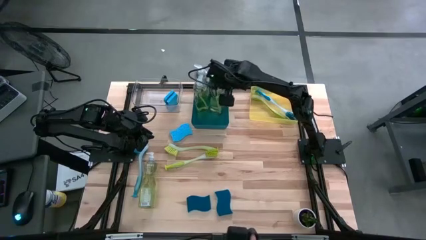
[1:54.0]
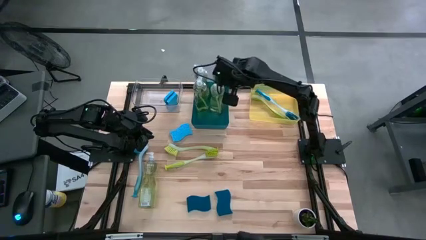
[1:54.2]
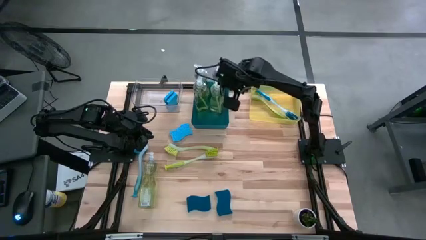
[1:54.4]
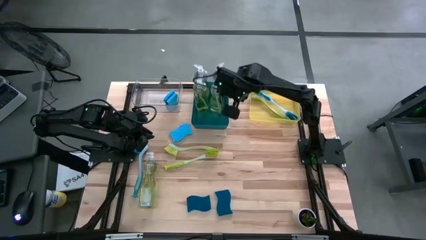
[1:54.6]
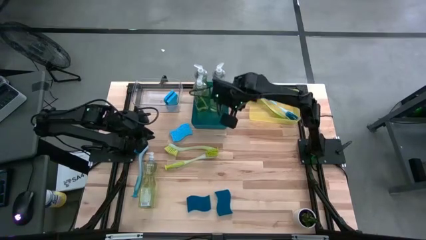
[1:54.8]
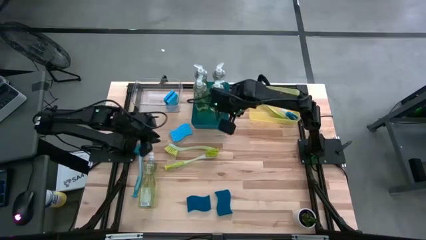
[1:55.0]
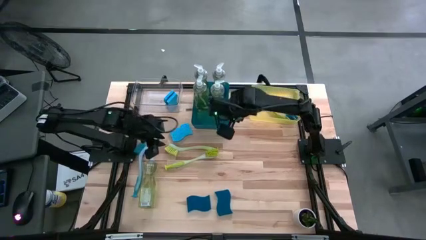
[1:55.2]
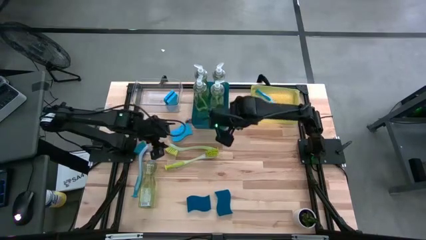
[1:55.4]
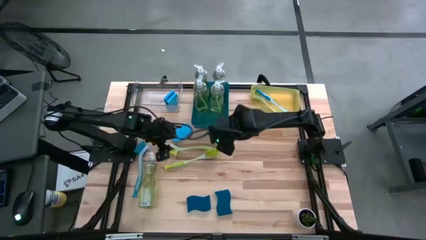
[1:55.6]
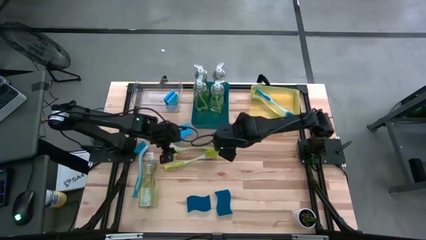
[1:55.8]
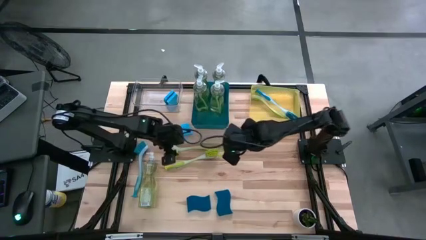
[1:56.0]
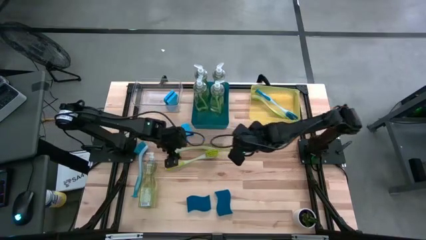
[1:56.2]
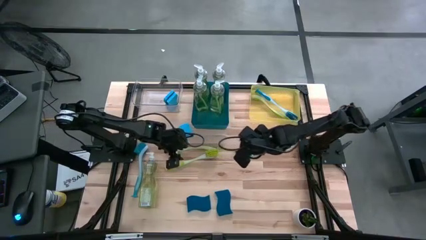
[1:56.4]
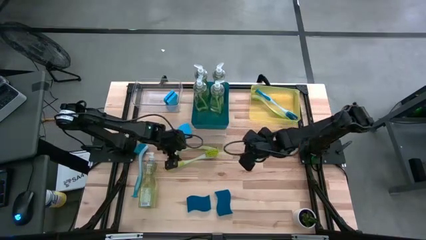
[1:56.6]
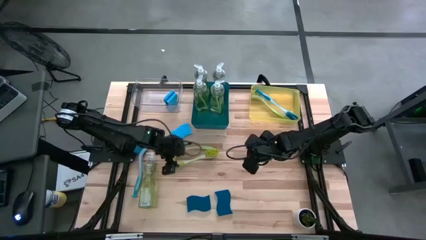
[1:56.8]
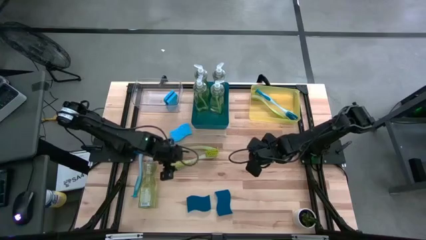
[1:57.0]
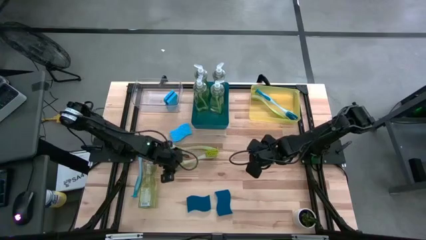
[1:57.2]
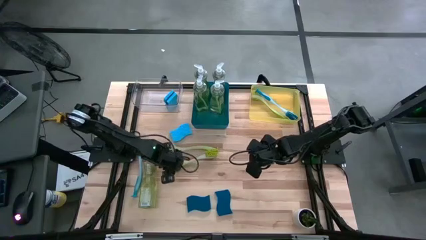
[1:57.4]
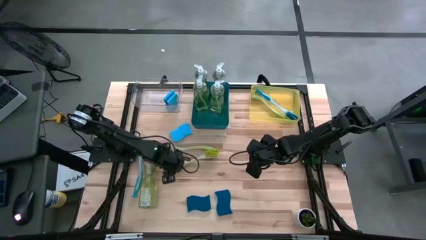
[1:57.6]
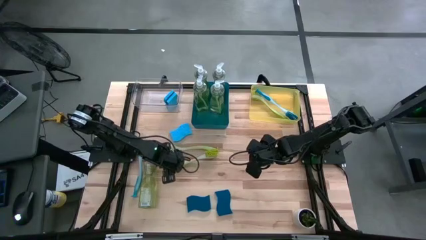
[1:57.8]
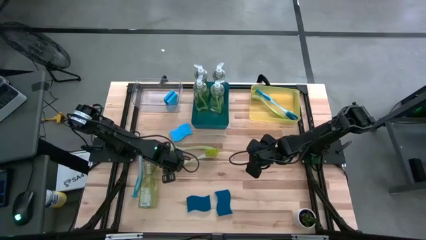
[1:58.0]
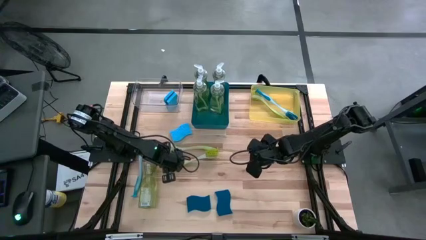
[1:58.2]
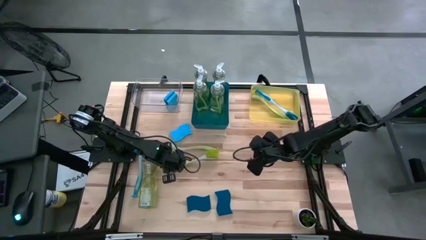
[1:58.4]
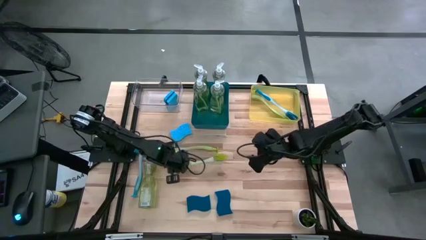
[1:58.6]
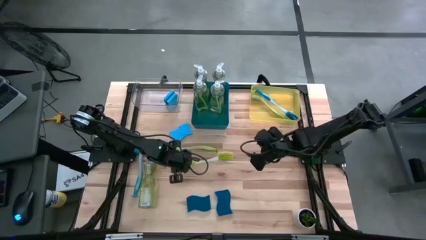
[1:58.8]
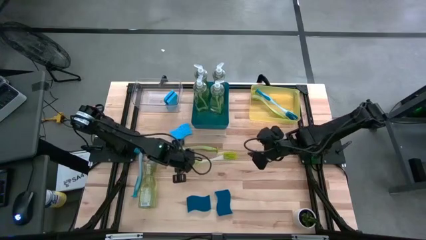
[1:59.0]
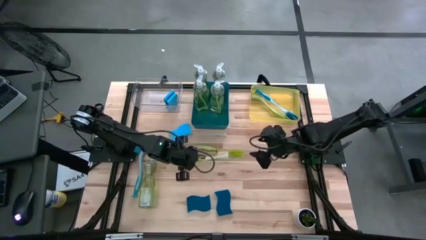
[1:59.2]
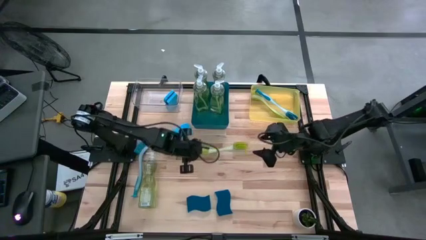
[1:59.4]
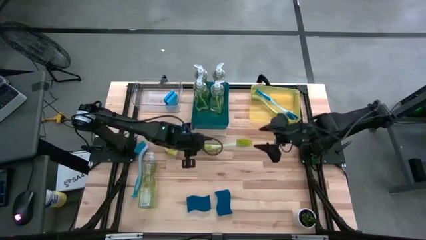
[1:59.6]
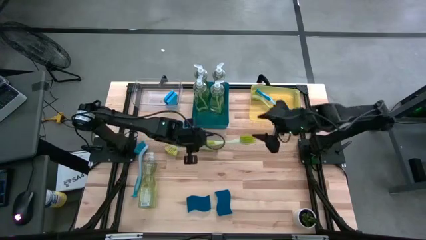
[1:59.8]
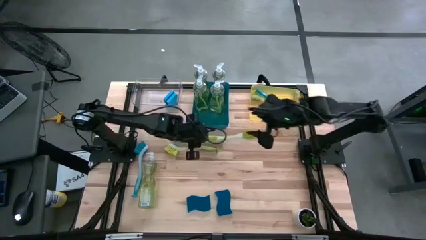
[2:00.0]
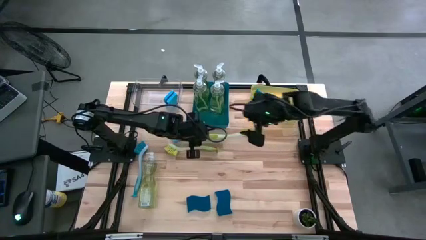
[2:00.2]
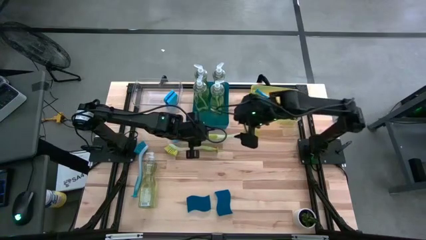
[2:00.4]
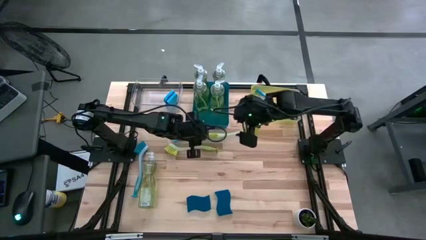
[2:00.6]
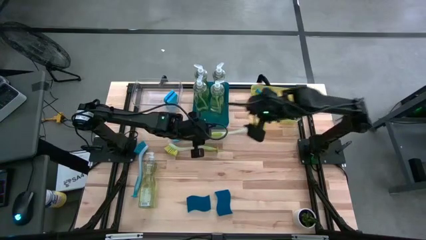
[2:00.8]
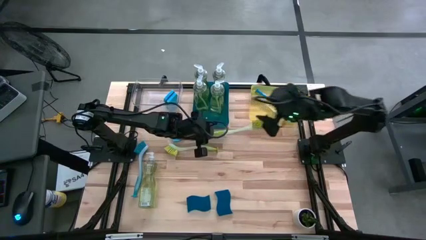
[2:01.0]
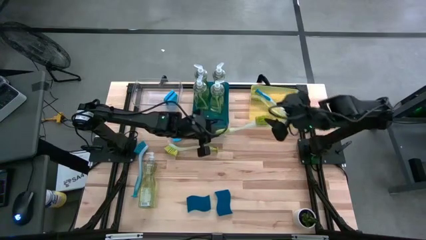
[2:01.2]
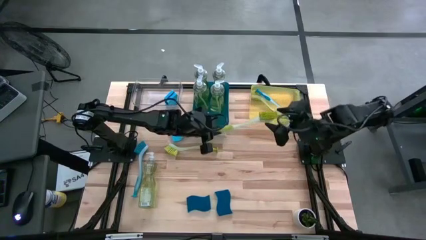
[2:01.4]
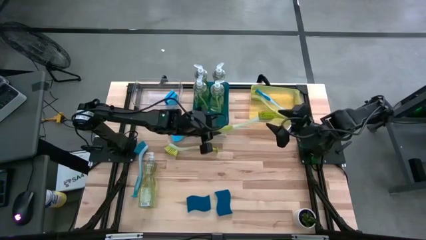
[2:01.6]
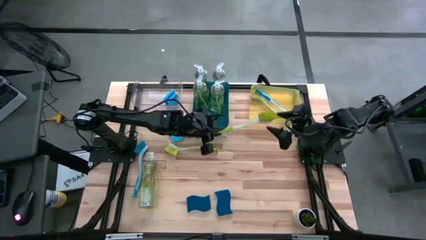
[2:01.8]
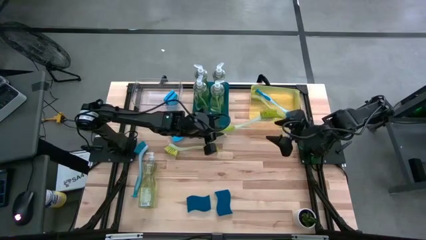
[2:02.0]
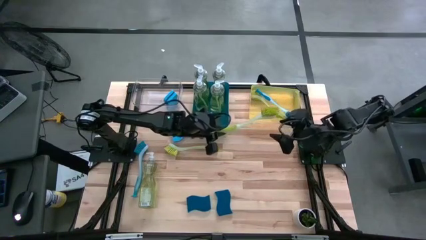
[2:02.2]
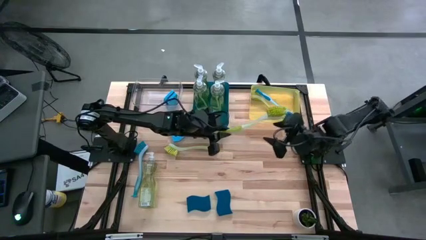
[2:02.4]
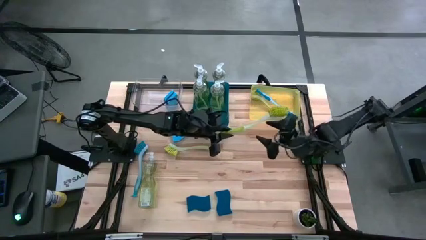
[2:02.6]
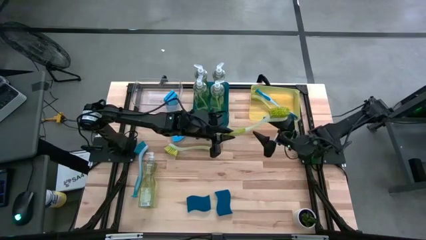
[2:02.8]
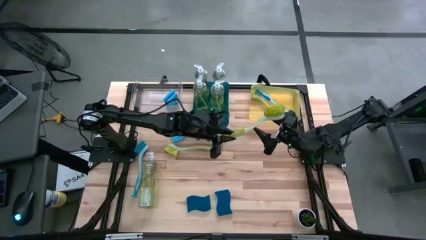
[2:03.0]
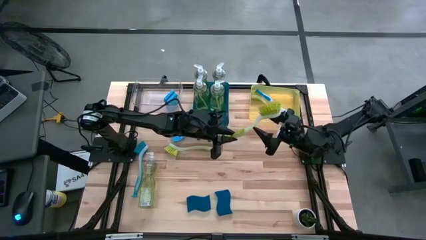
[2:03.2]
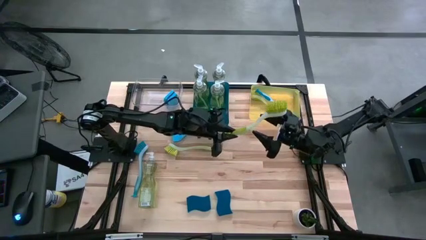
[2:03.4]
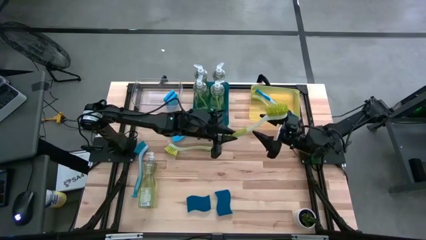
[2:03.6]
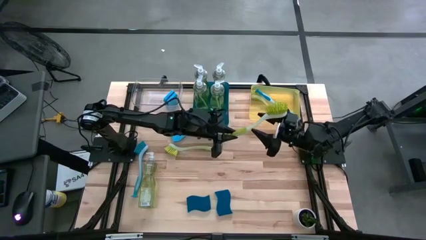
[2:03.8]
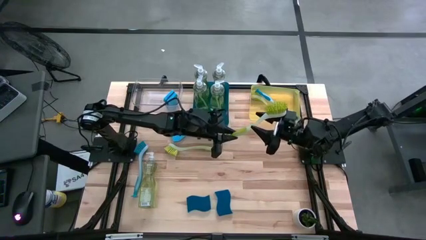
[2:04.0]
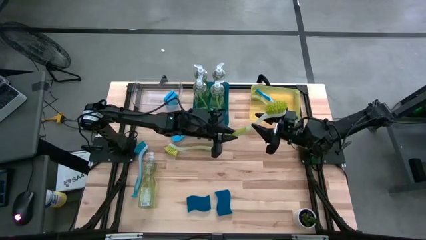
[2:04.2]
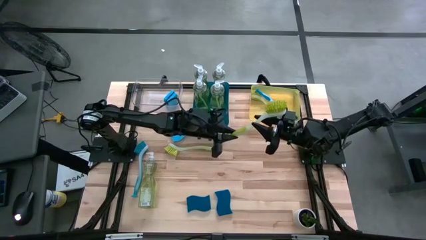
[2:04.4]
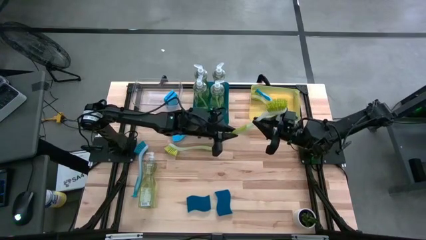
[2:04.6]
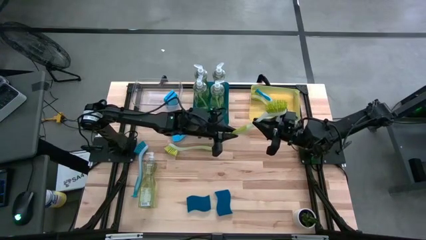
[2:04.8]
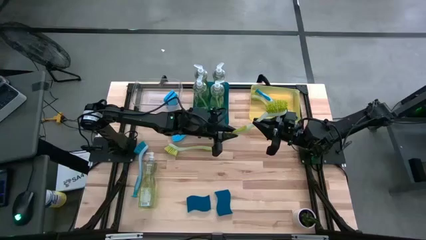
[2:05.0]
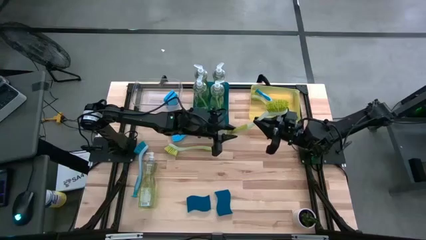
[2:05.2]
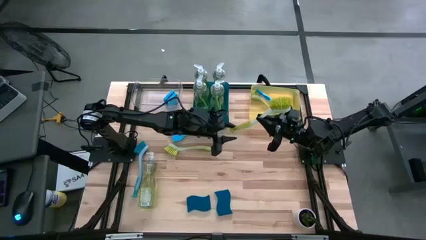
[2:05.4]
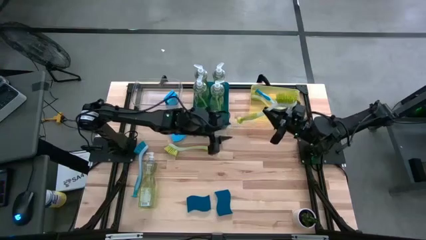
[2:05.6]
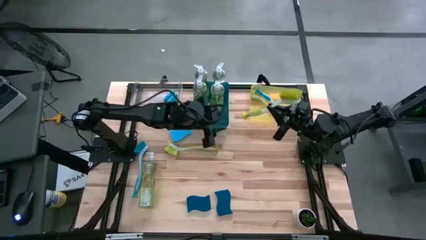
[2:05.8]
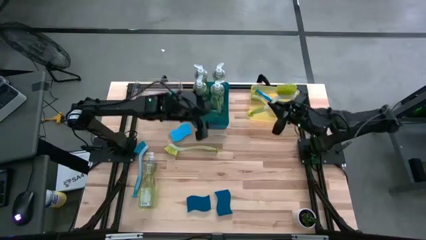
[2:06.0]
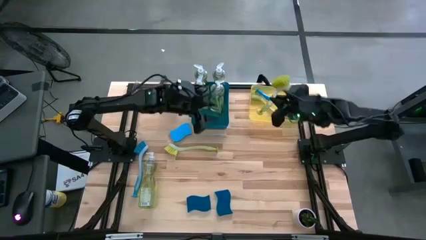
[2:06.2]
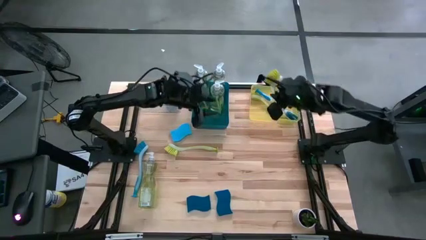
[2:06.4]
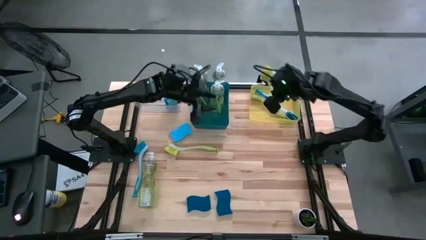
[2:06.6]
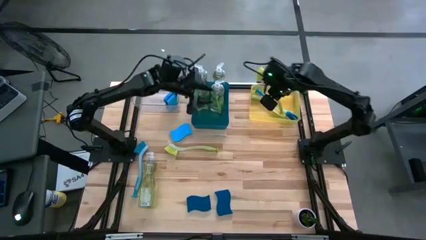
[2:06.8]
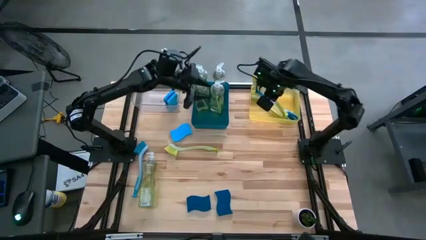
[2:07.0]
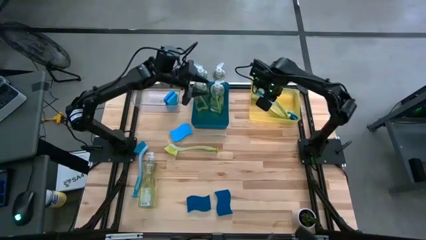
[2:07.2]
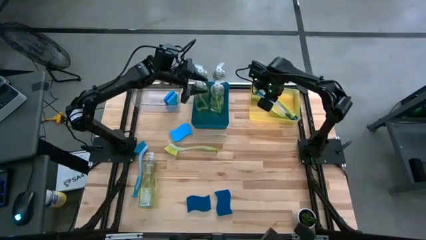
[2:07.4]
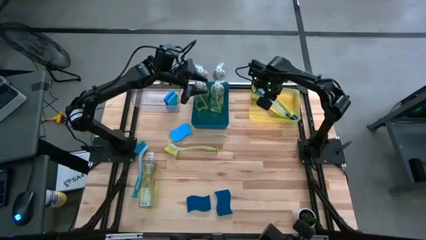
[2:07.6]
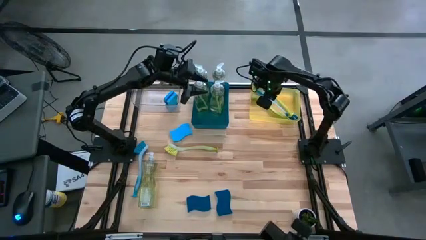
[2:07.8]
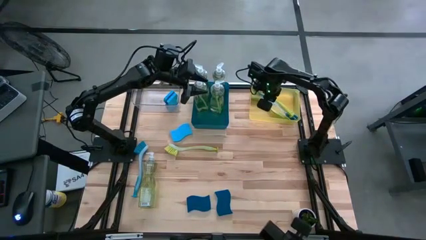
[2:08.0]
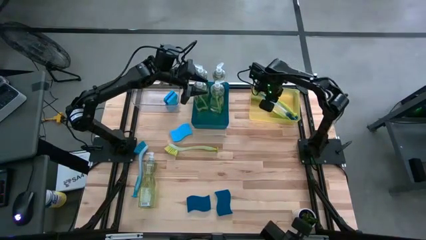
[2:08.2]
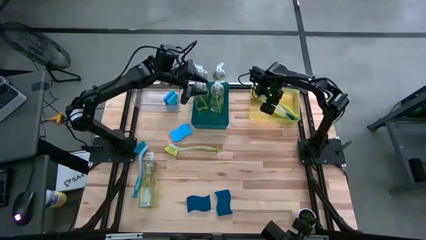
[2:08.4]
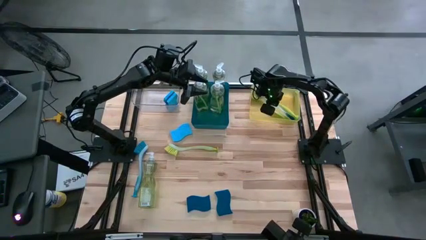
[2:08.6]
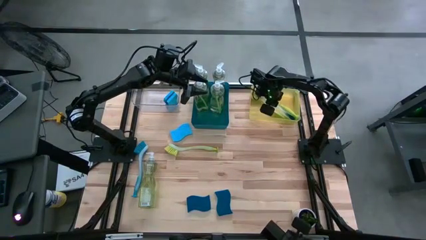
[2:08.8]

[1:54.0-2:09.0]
Task: Pick & Place Kitchen Sink Supplies
Put the green dish brush into the yellow bin
